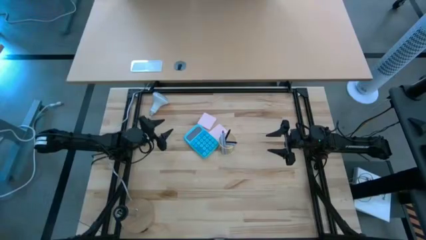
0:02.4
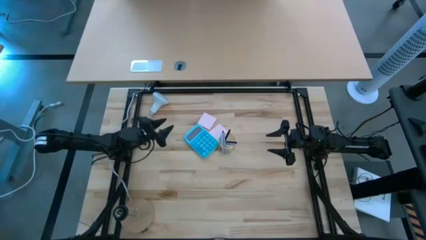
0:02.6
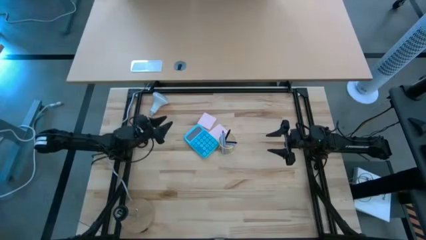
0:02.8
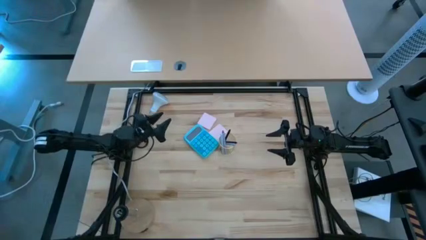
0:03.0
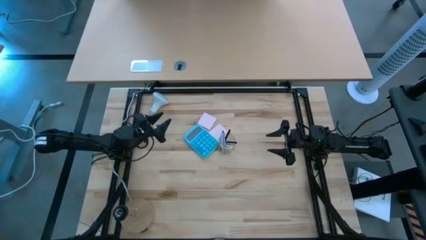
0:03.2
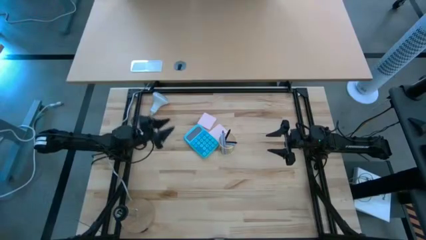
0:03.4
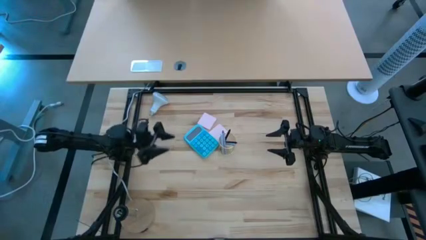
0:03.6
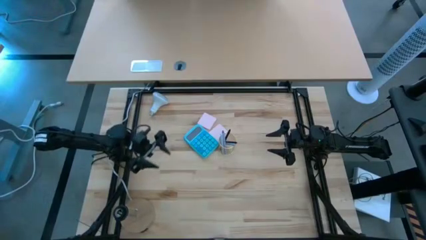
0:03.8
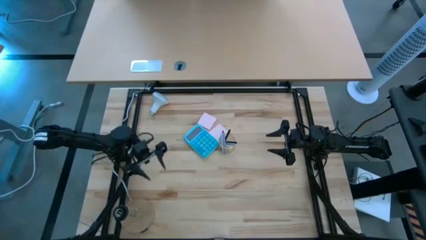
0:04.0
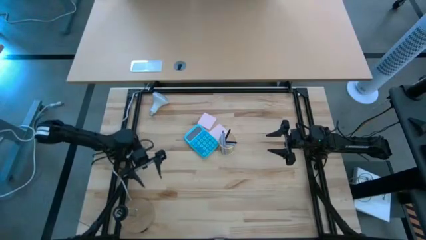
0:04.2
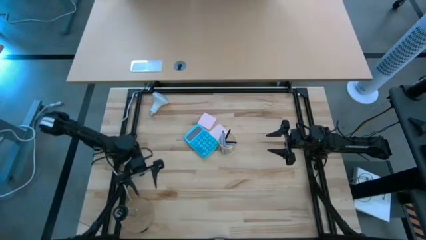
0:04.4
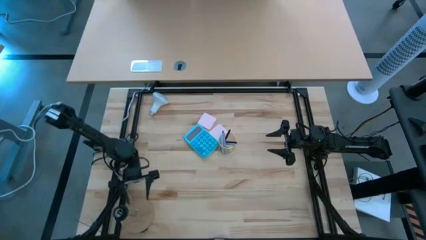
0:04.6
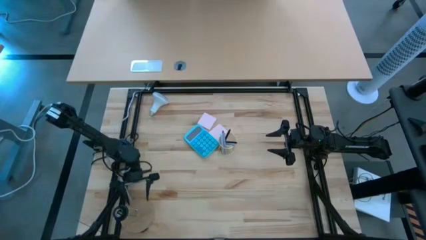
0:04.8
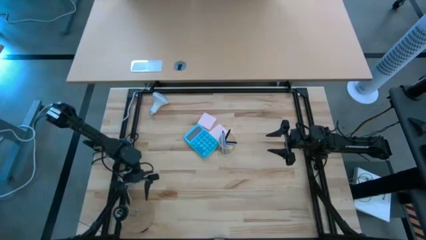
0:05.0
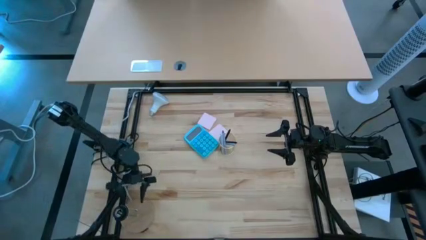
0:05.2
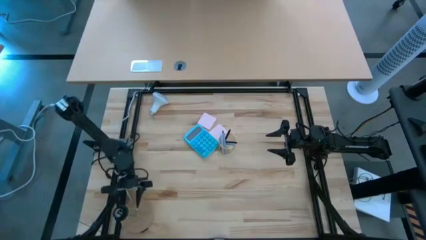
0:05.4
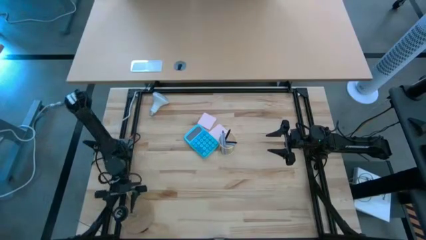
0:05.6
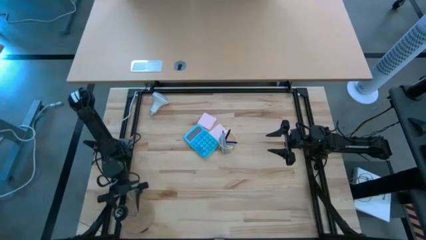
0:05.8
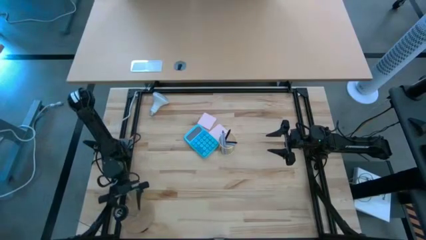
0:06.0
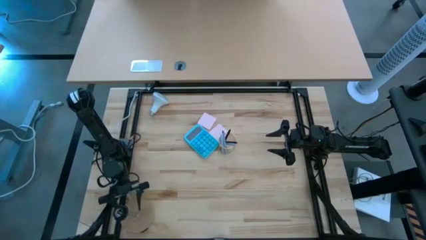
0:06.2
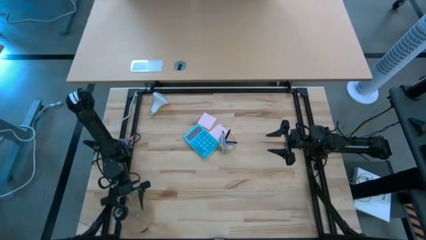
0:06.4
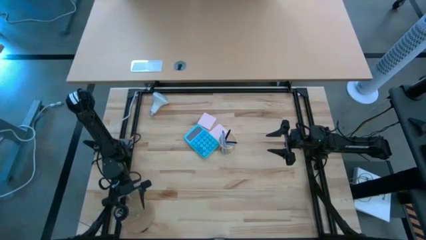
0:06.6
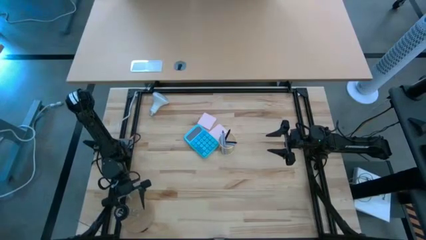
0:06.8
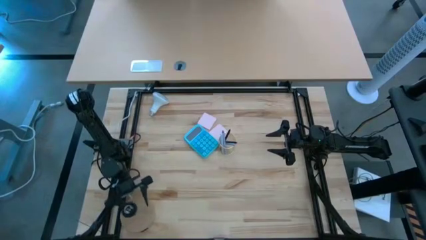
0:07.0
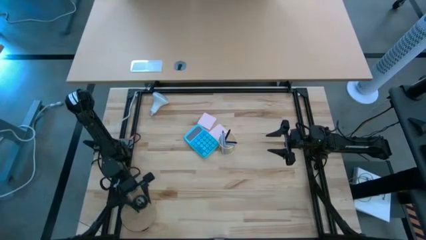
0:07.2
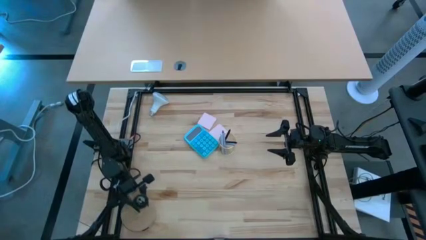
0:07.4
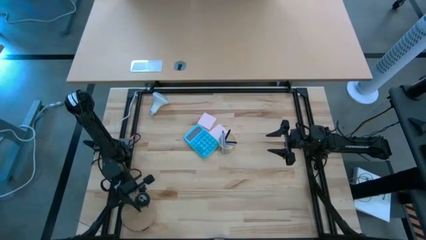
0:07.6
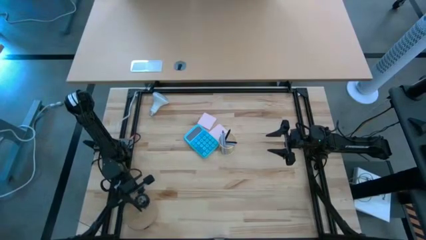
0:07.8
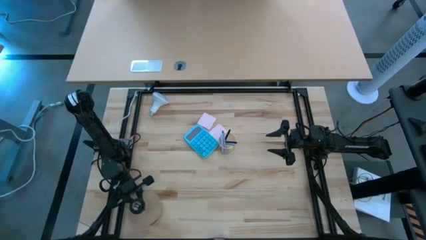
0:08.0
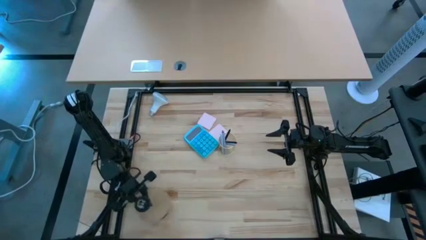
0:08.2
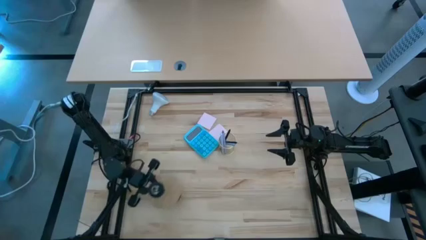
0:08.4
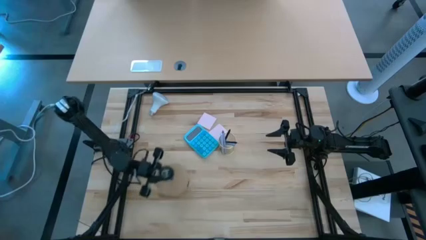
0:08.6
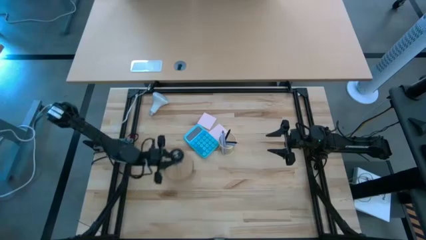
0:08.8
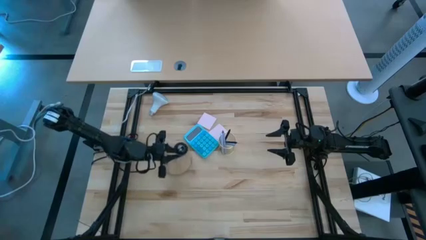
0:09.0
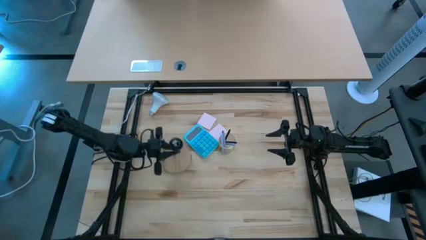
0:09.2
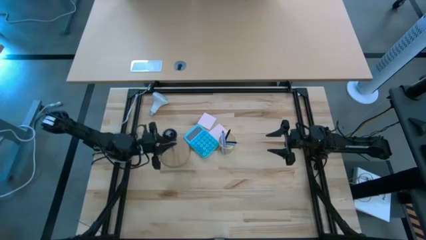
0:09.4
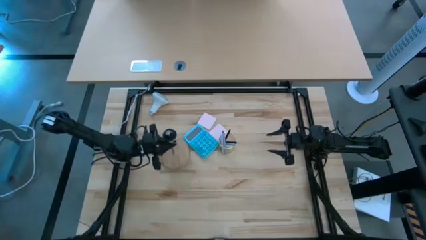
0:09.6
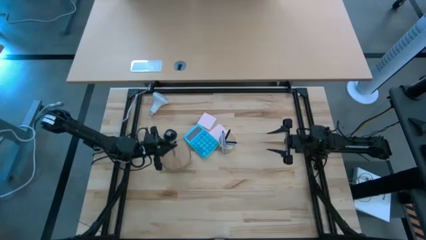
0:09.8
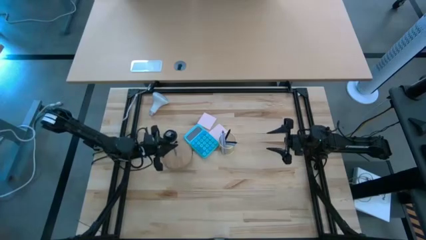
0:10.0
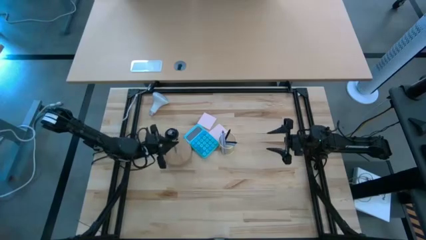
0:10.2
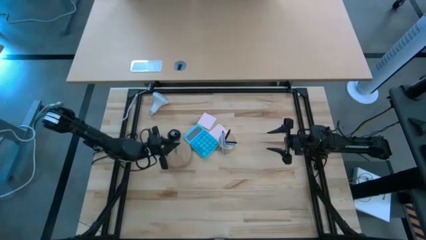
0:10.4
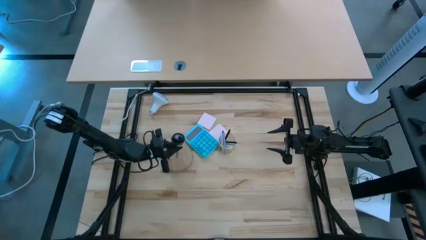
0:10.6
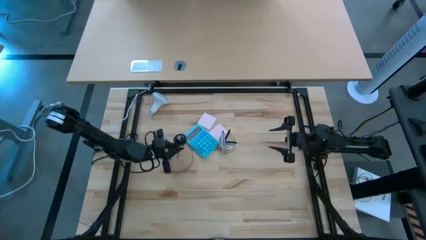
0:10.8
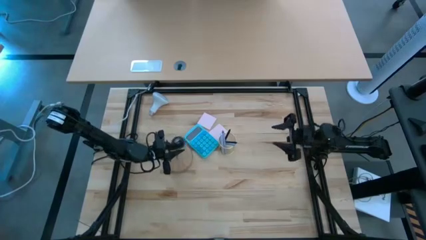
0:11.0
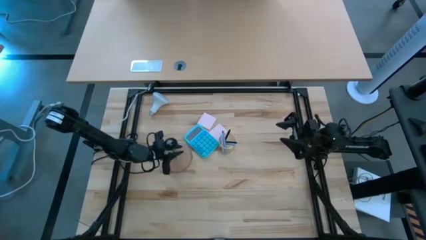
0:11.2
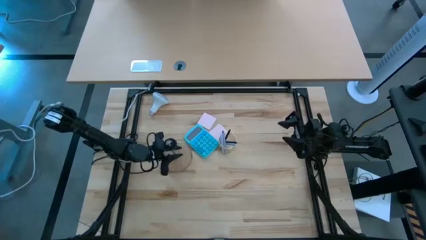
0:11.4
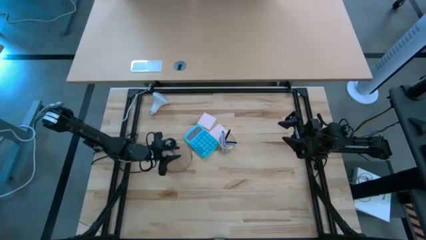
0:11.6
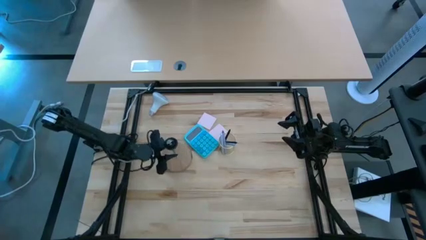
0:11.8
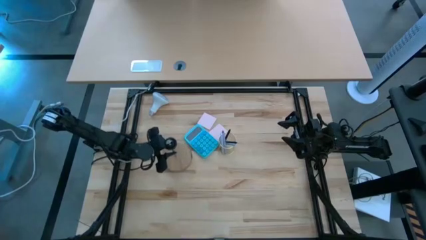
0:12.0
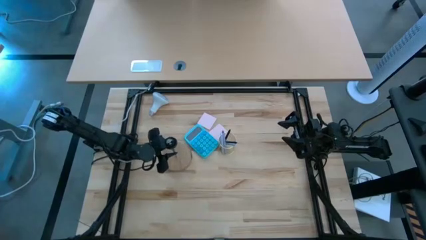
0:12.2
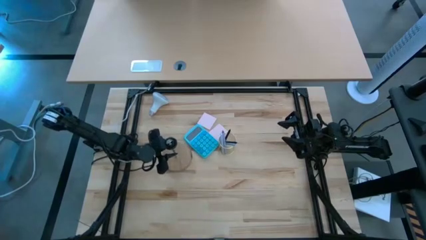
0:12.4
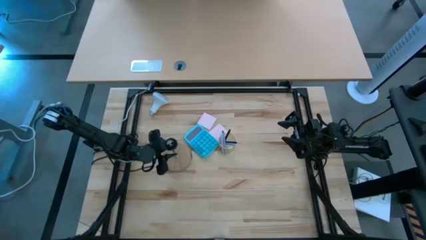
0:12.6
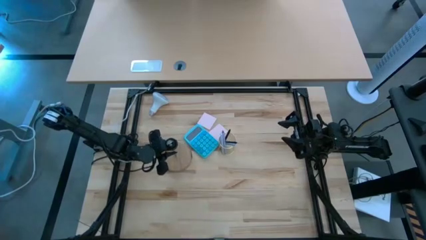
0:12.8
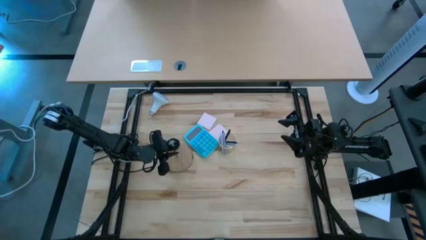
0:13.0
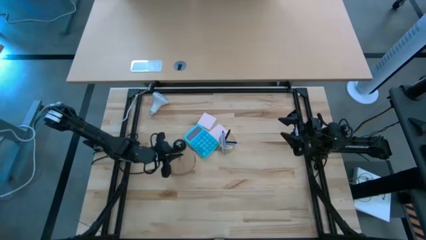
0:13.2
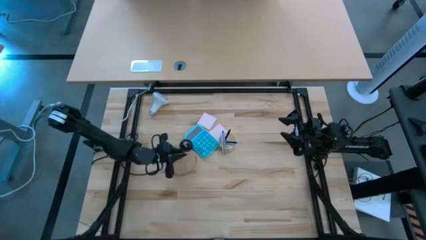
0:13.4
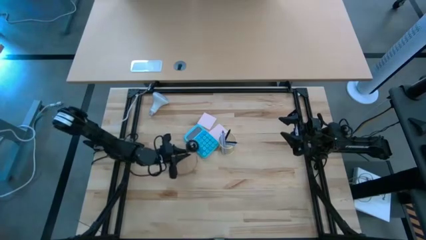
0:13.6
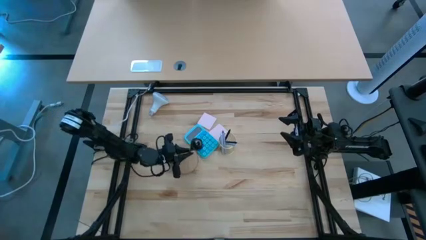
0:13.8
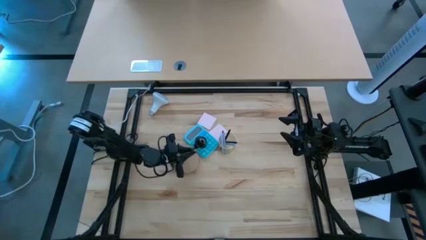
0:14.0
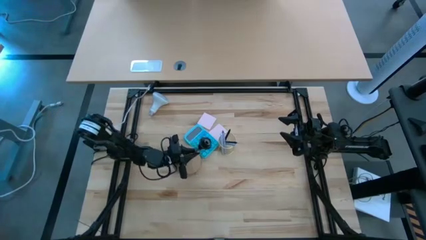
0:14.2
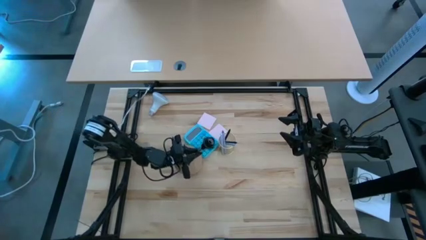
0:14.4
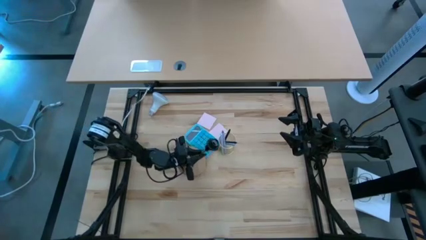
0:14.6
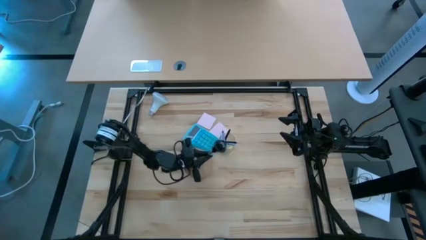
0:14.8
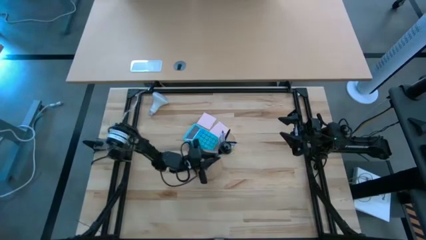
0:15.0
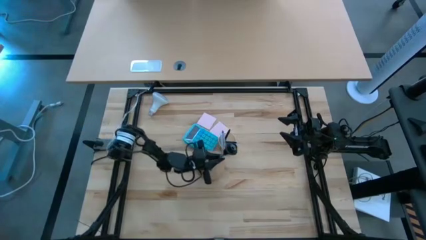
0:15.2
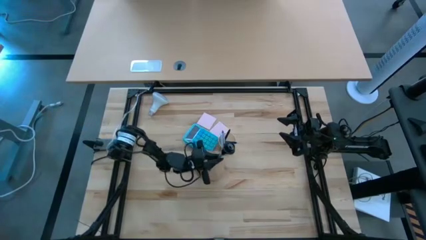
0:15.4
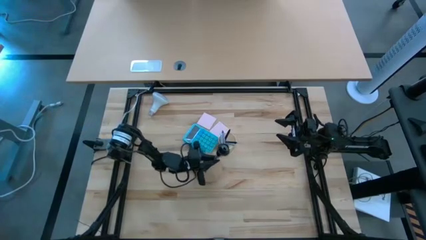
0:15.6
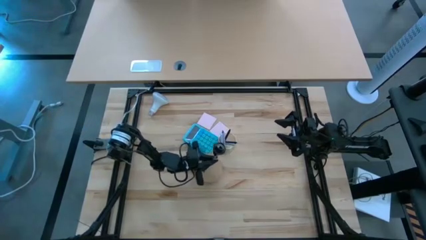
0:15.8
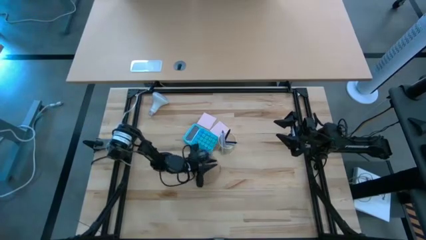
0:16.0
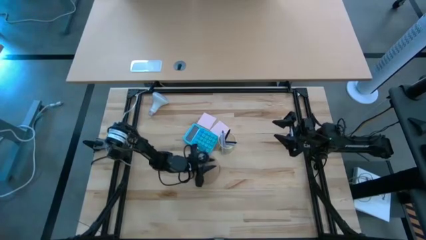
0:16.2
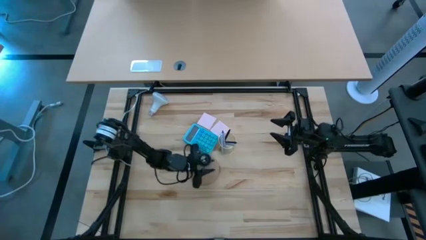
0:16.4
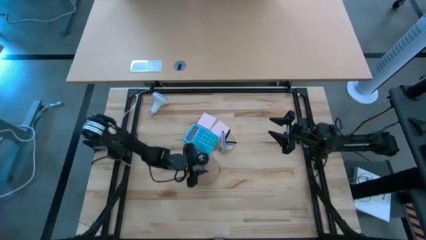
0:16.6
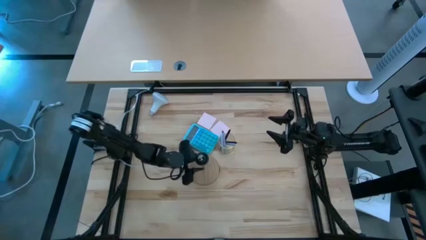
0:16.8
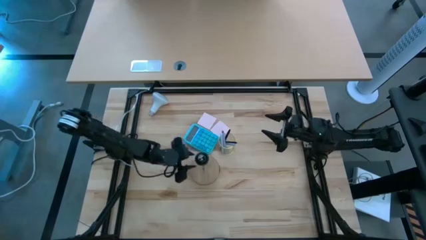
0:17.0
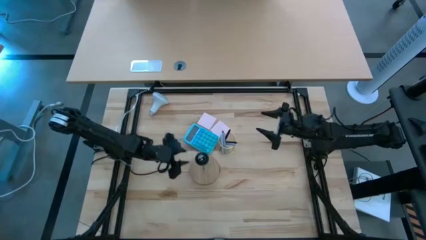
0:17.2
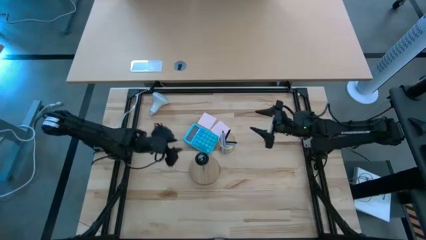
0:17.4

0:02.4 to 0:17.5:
Task: Screw lightbulb
Insert the lightbulb into the black table lamp
